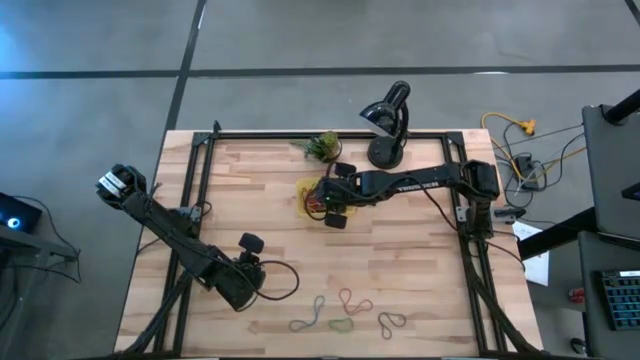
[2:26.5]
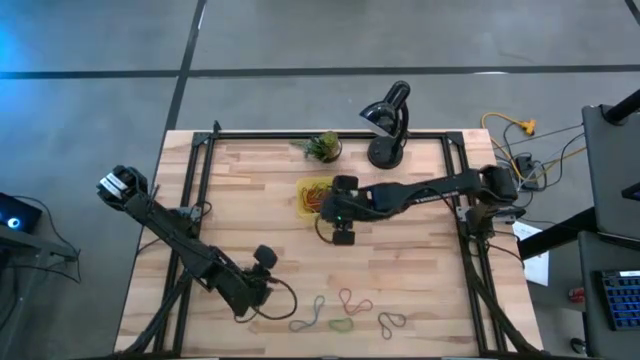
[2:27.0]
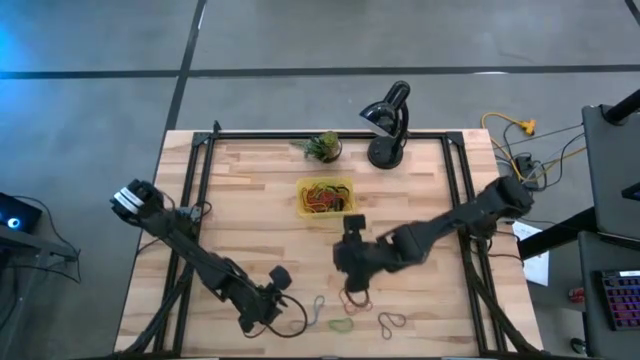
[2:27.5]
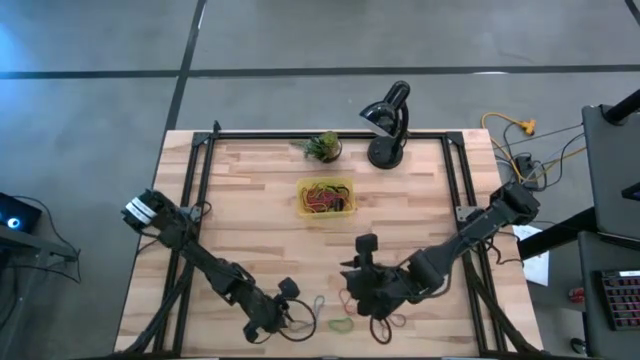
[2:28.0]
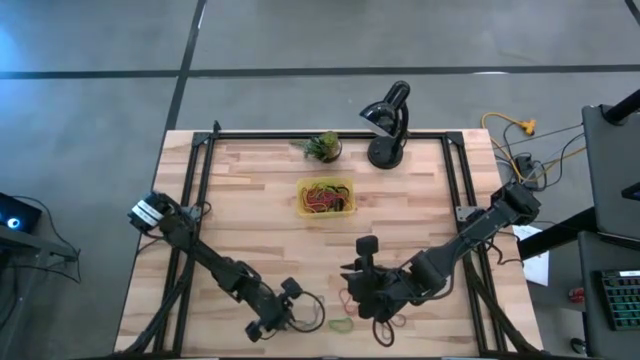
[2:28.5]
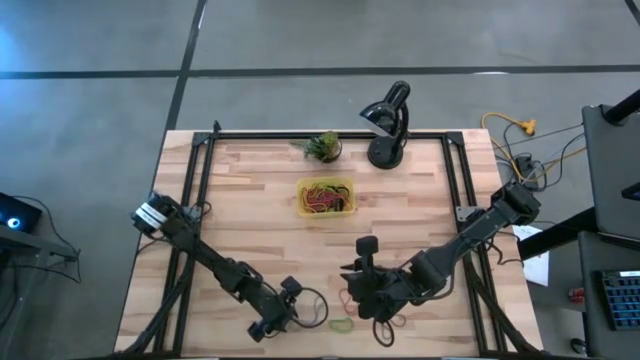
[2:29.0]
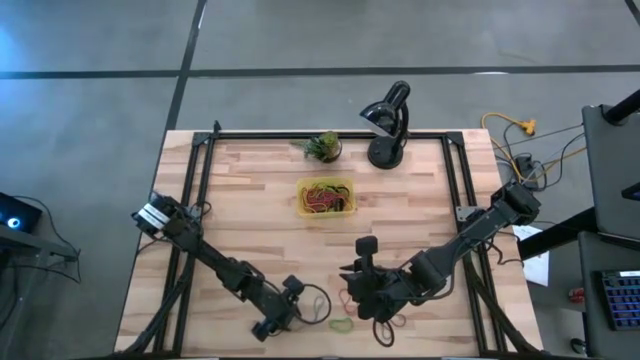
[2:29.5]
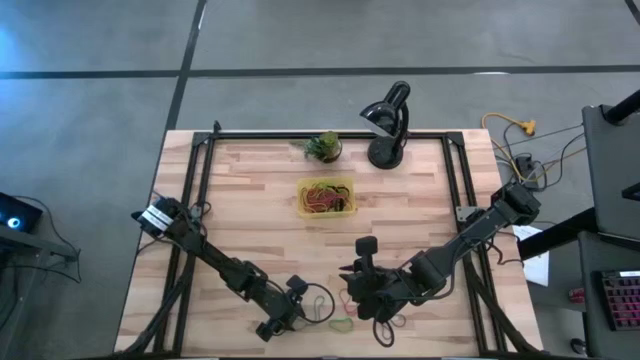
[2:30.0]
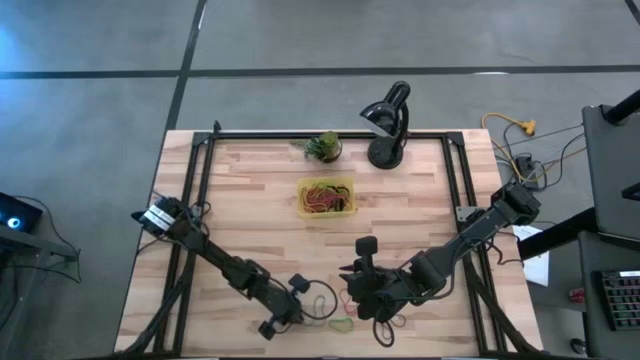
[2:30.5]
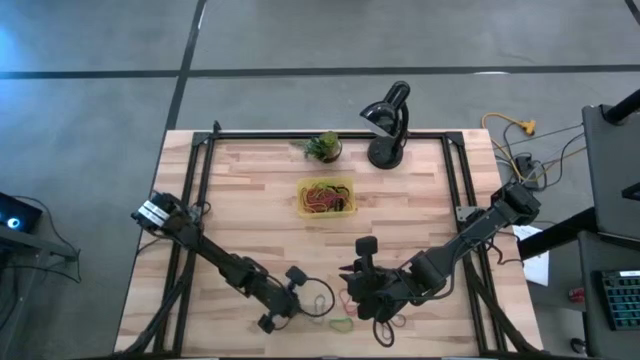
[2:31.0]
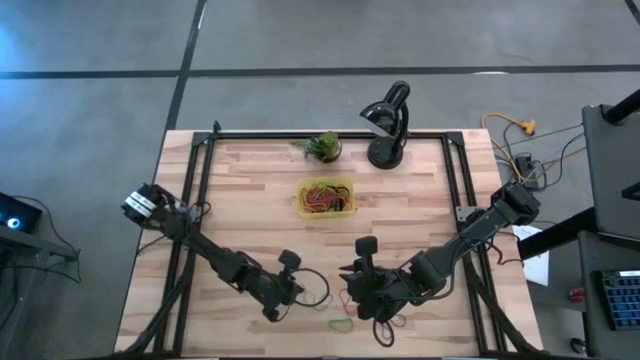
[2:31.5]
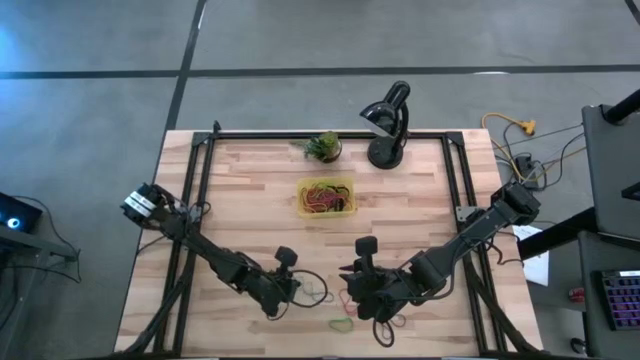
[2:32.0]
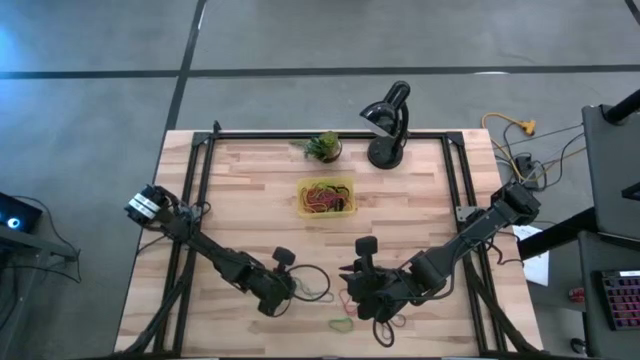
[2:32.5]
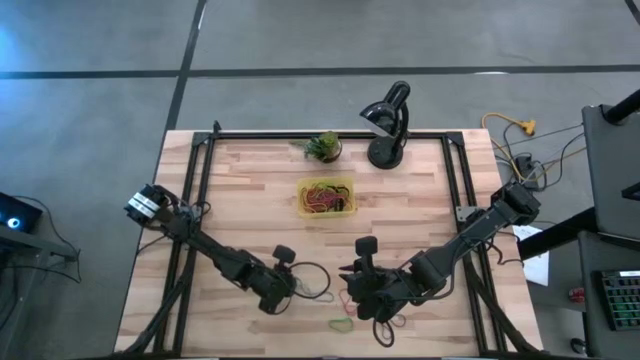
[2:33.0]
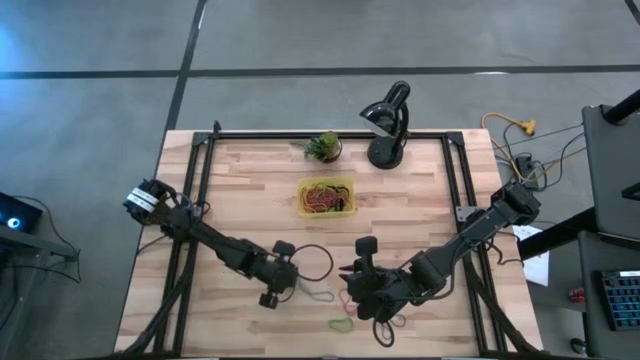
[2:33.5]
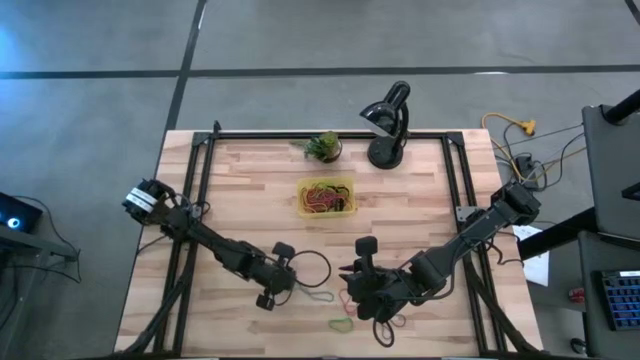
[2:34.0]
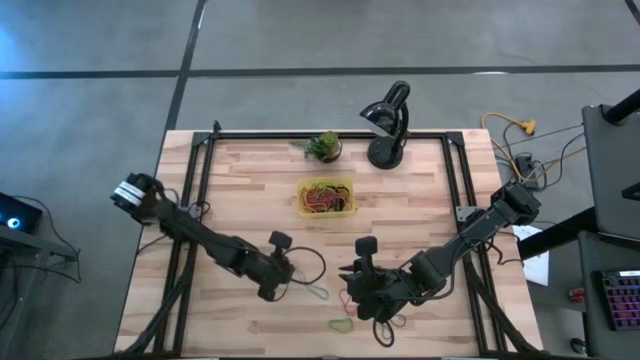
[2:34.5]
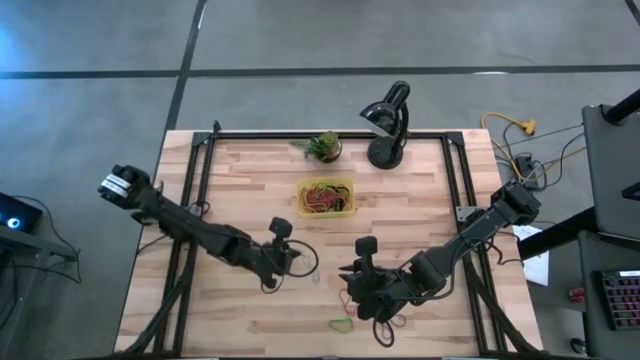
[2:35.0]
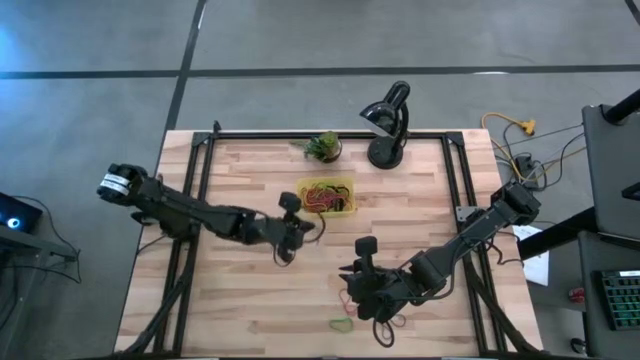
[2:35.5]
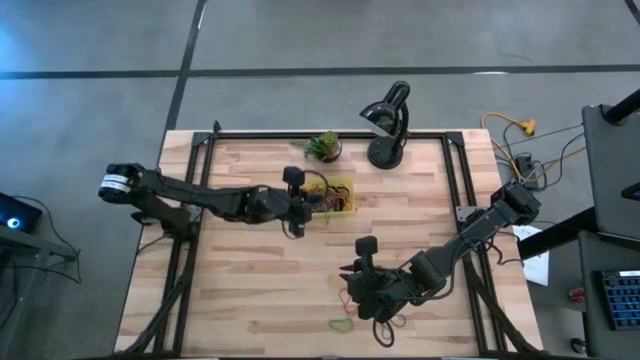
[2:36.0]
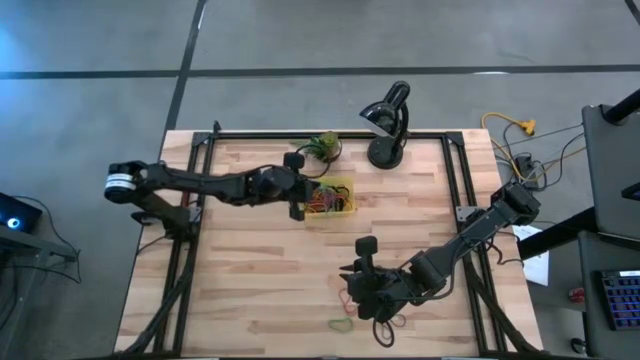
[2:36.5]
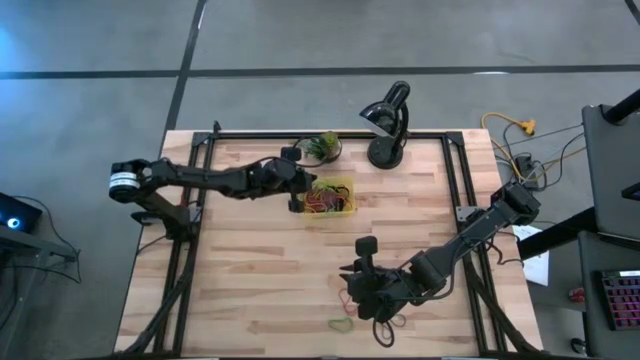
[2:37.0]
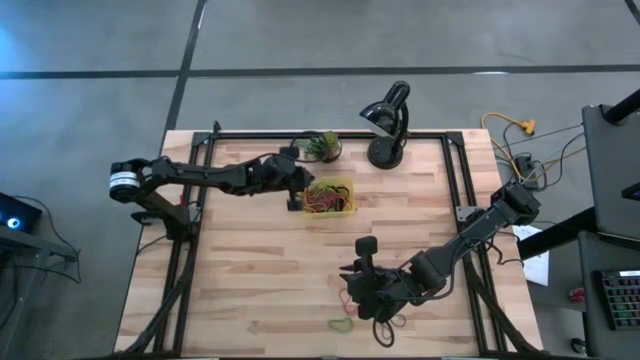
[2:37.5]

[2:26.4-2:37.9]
Task: Pick and place rubber bands into bin
Put the blue rubber band in the yellow bin

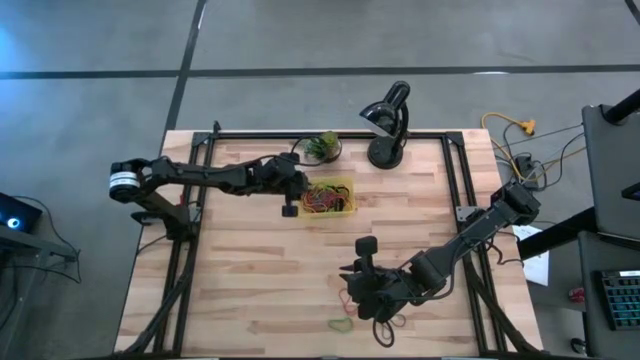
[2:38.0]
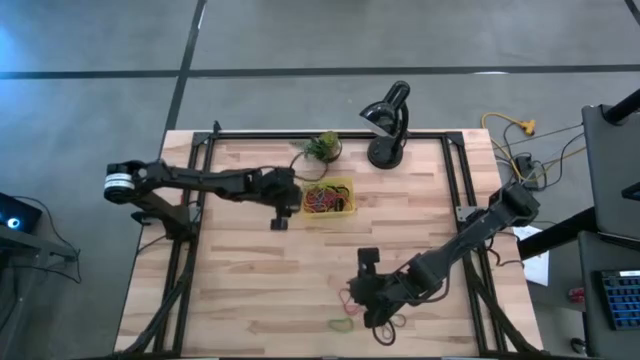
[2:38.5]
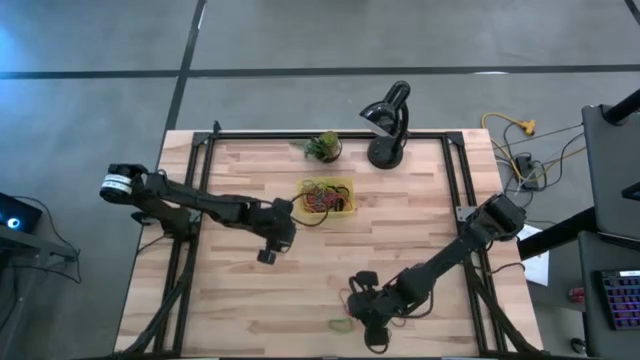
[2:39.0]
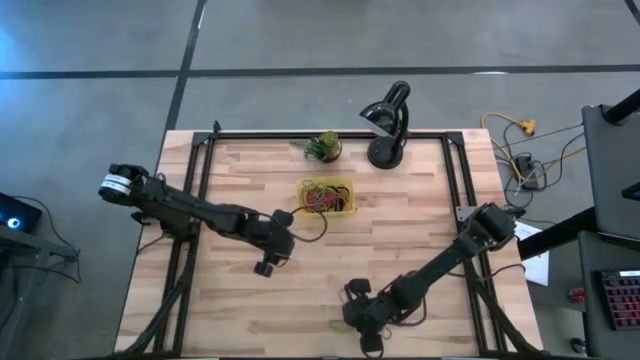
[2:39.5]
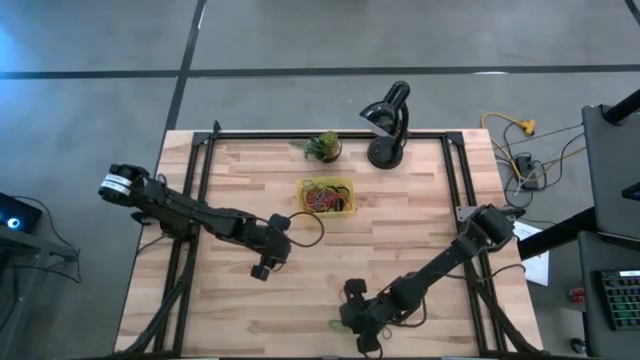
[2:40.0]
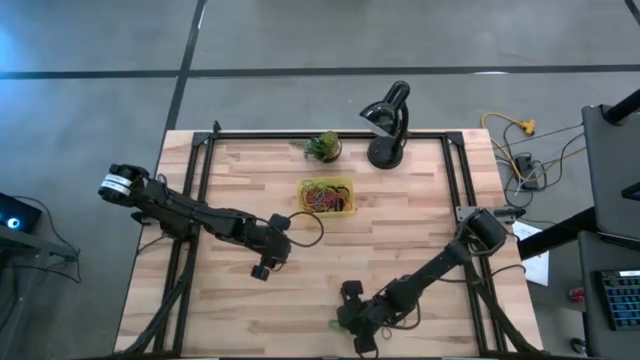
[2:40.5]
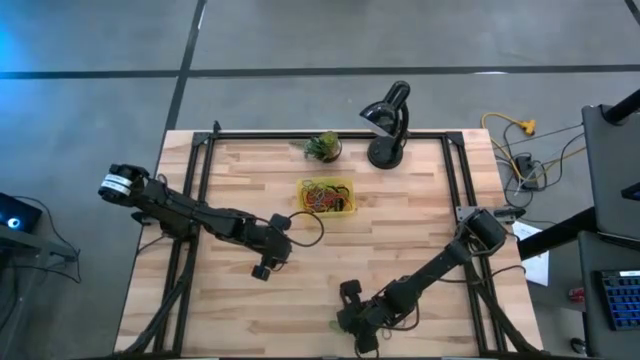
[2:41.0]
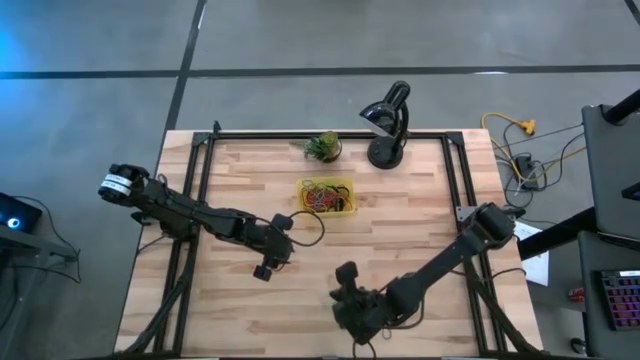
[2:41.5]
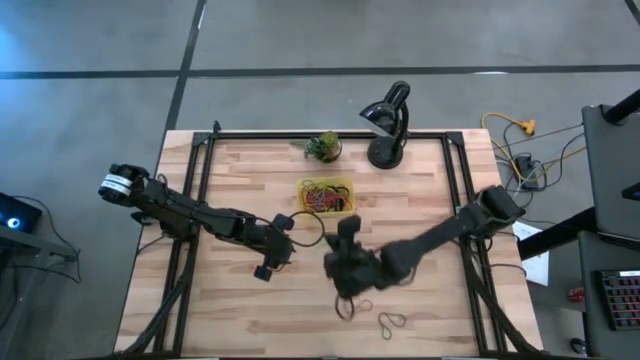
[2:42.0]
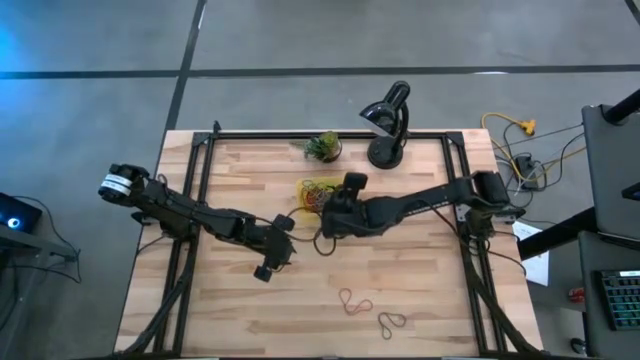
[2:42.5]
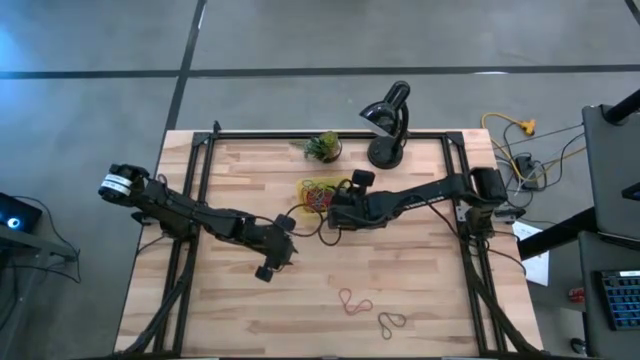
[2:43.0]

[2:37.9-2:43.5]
Put the green rubber band in the yellow bin

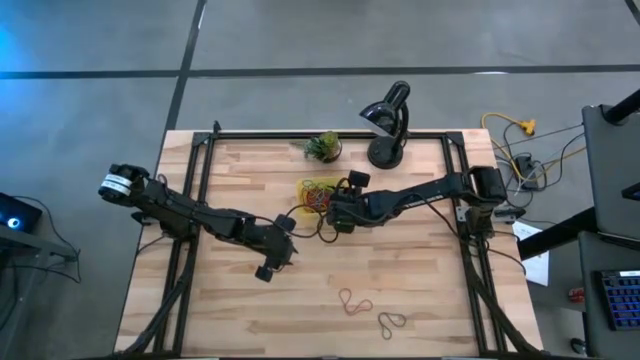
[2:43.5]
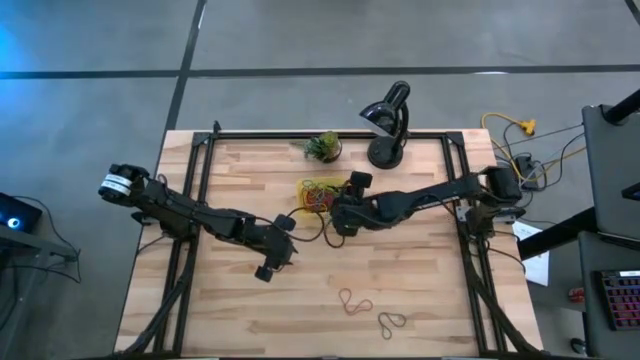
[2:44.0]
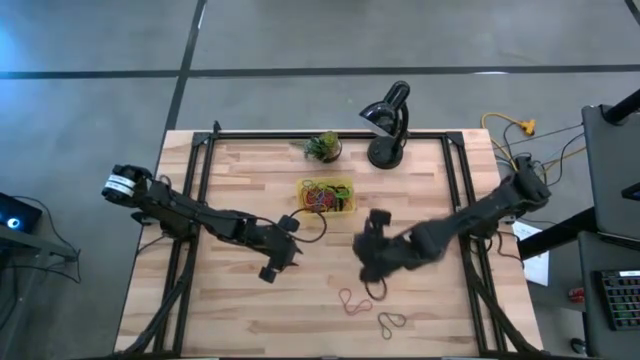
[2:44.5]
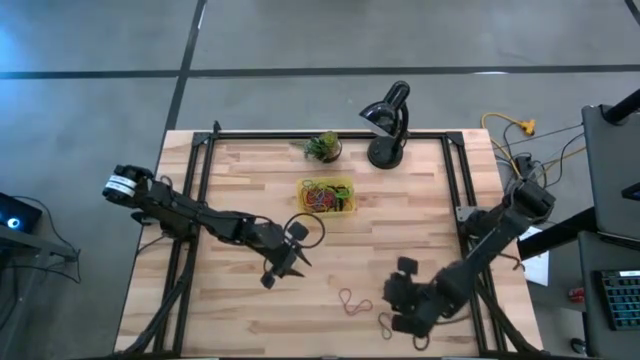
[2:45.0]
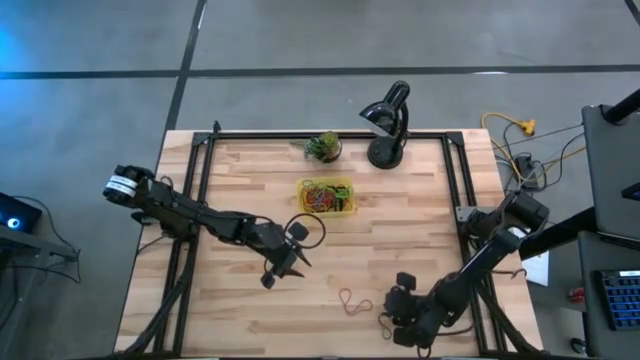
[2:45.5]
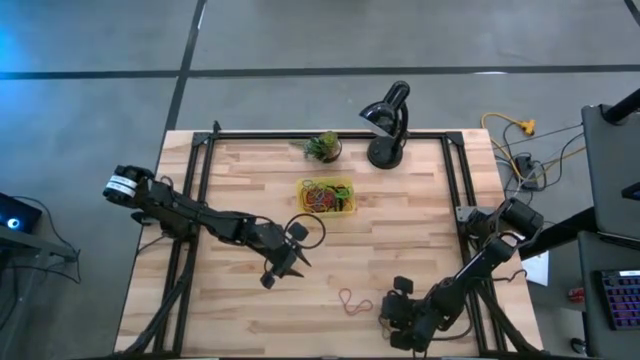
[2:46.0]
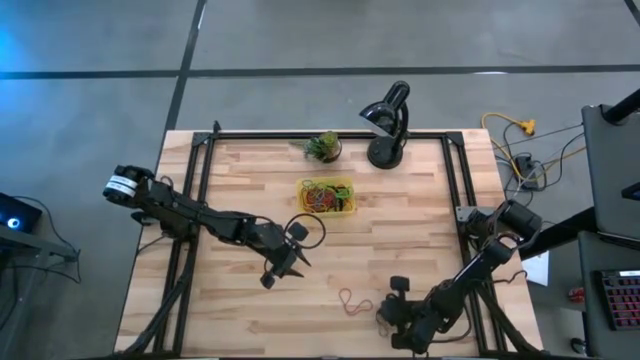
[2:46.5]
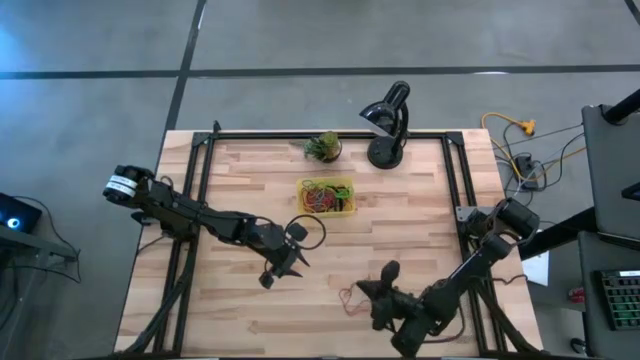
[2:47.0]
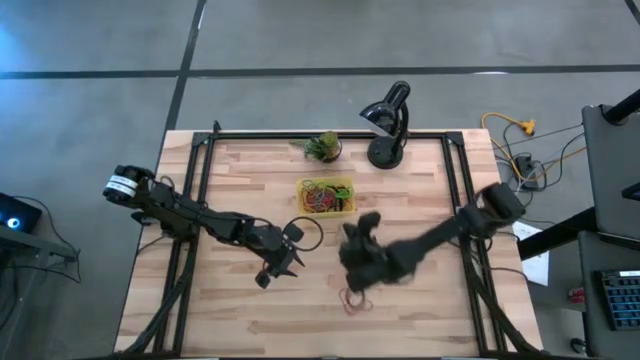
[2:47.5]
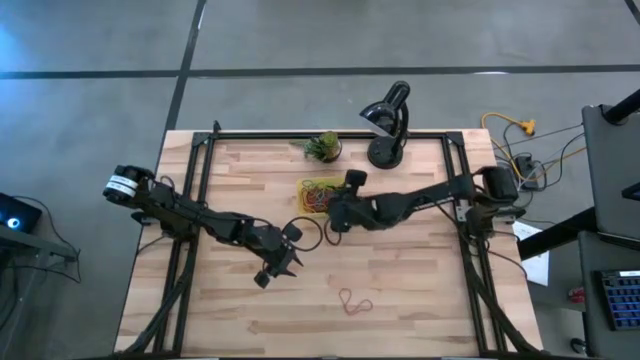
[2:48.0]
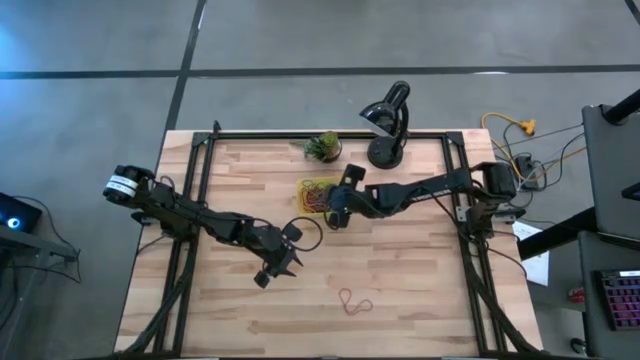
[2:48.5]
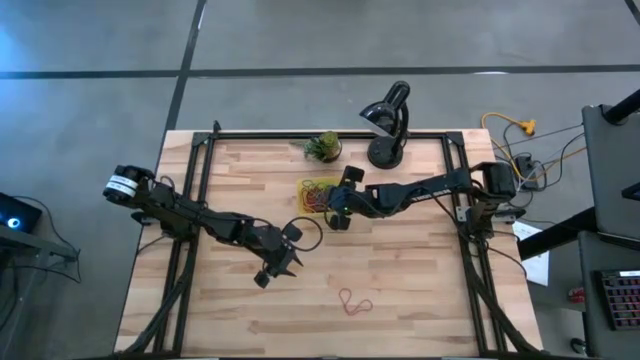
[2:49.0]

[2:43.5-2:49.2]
Put the purple rubber band in the yellow bin
